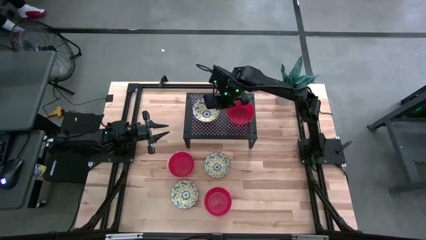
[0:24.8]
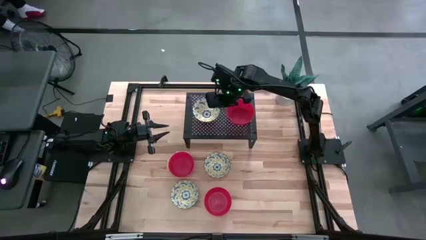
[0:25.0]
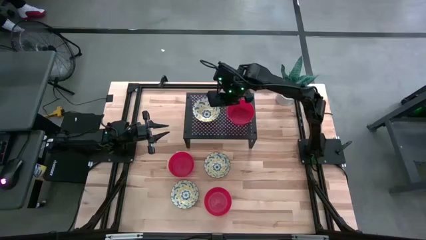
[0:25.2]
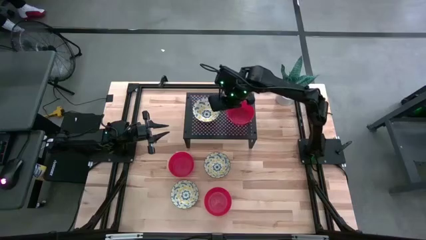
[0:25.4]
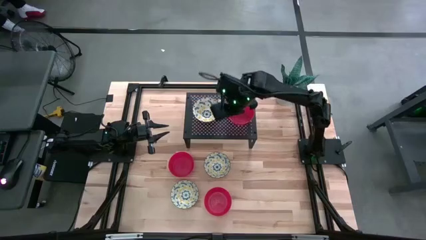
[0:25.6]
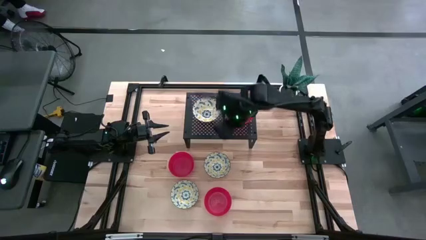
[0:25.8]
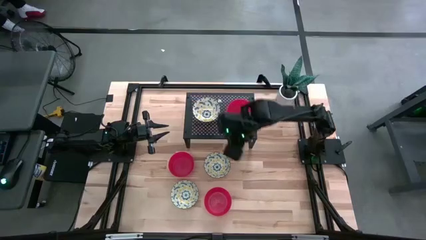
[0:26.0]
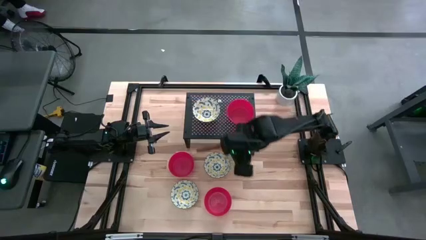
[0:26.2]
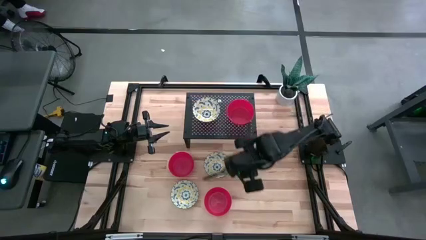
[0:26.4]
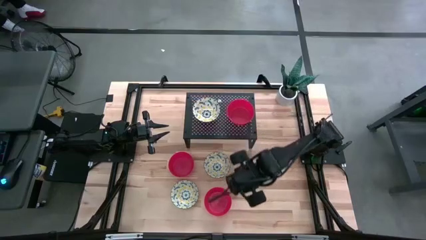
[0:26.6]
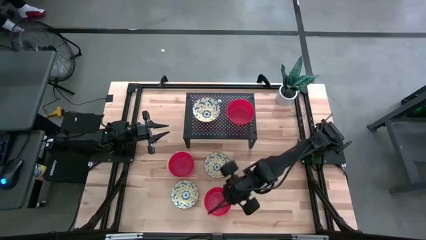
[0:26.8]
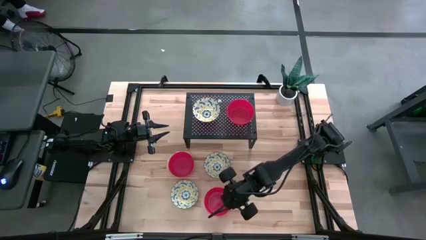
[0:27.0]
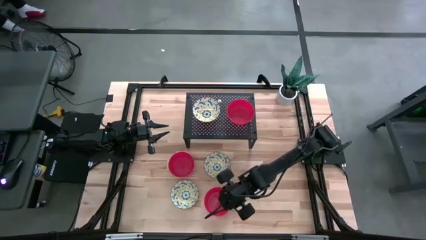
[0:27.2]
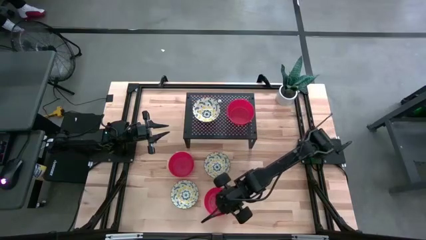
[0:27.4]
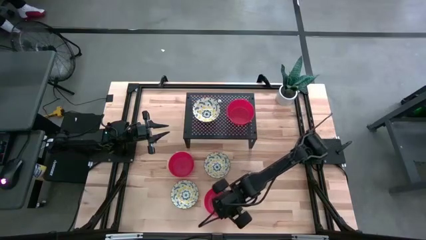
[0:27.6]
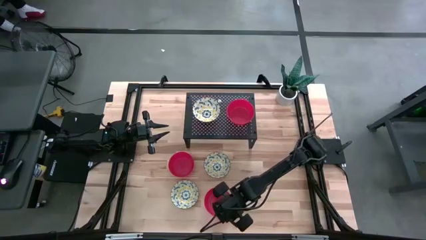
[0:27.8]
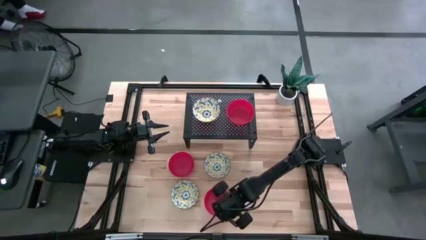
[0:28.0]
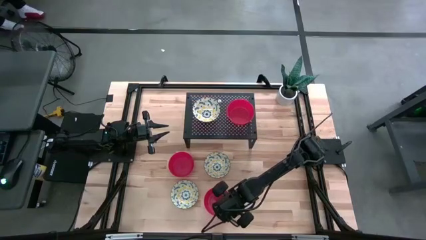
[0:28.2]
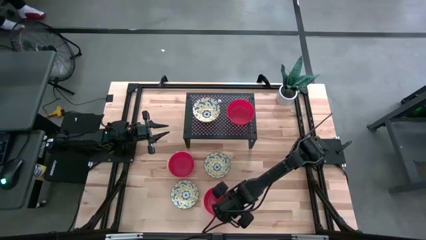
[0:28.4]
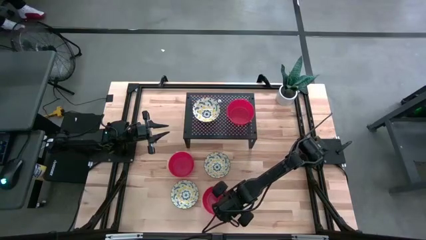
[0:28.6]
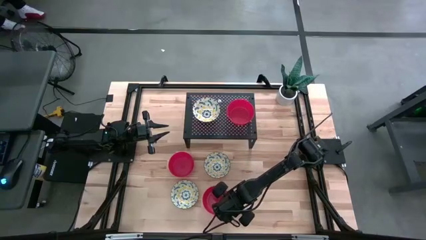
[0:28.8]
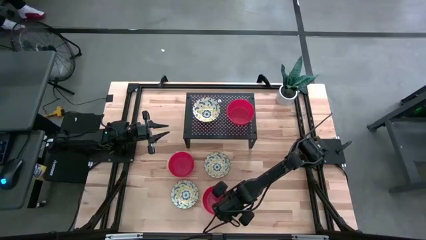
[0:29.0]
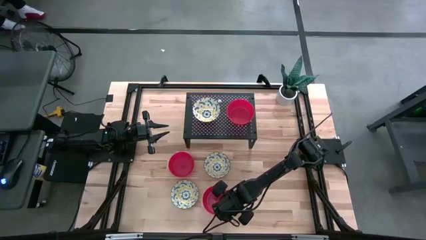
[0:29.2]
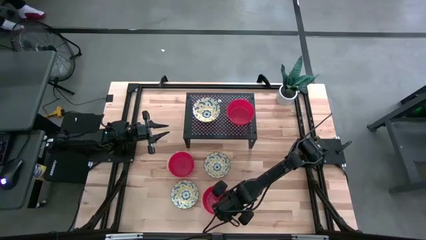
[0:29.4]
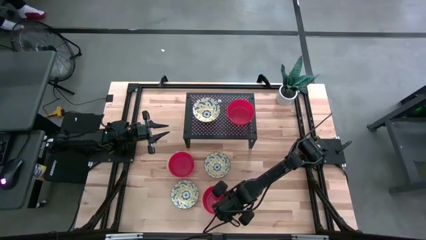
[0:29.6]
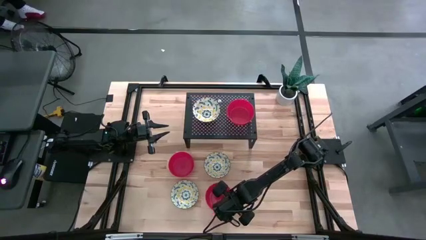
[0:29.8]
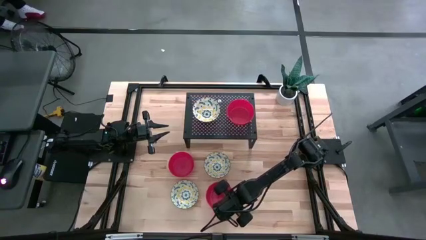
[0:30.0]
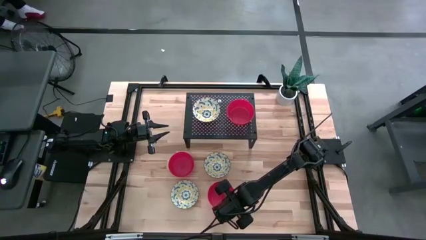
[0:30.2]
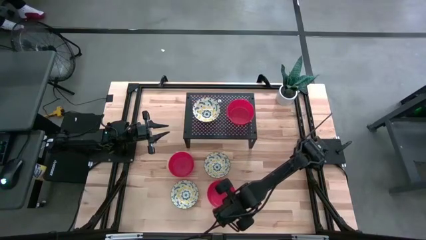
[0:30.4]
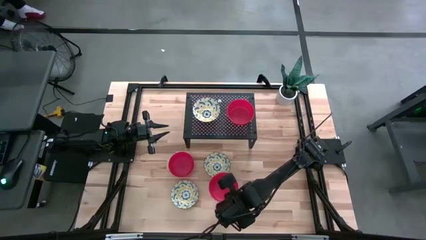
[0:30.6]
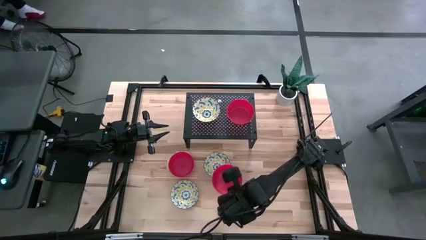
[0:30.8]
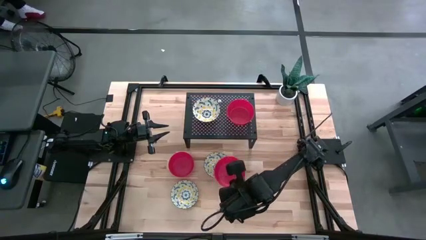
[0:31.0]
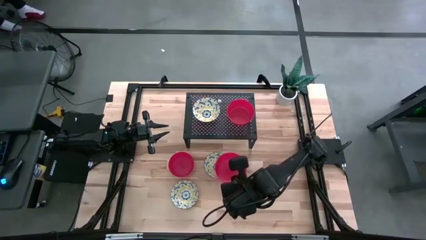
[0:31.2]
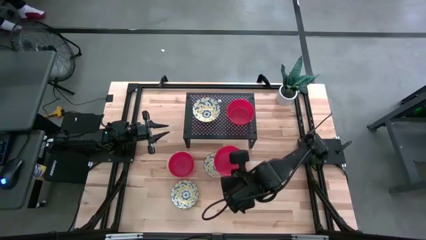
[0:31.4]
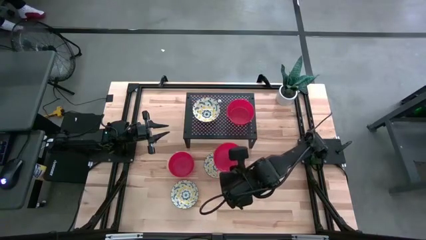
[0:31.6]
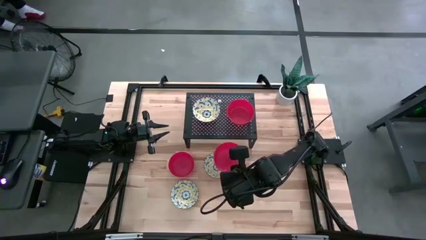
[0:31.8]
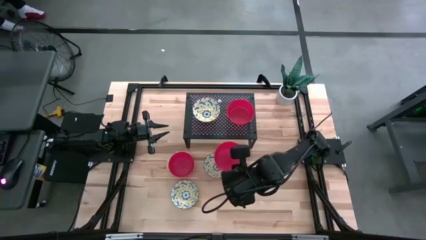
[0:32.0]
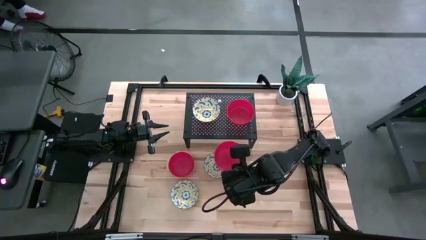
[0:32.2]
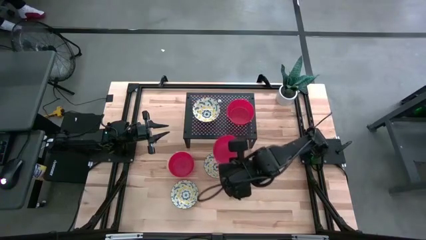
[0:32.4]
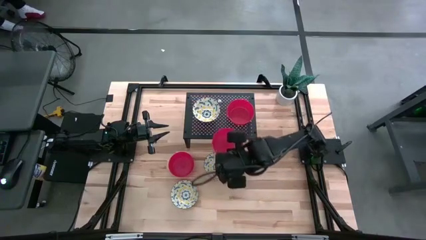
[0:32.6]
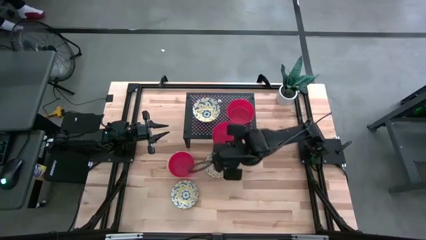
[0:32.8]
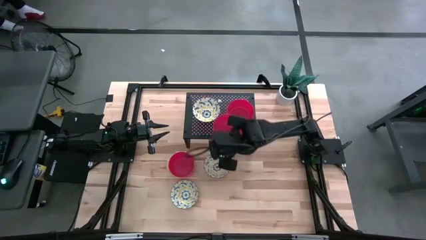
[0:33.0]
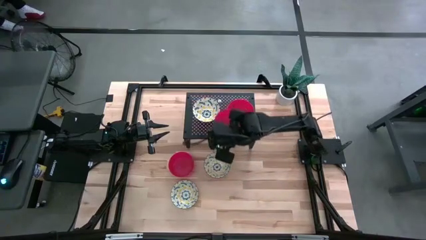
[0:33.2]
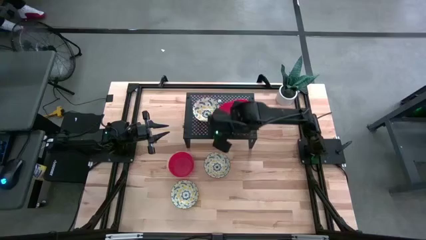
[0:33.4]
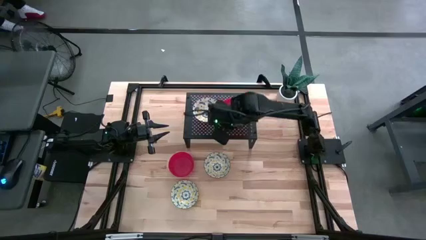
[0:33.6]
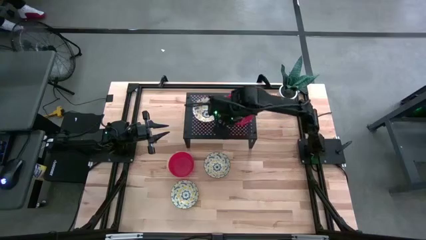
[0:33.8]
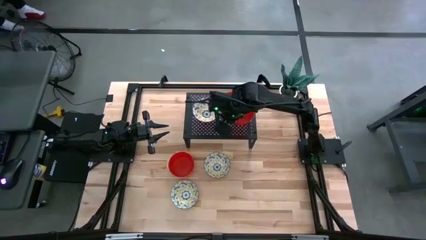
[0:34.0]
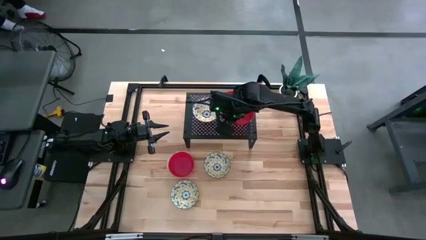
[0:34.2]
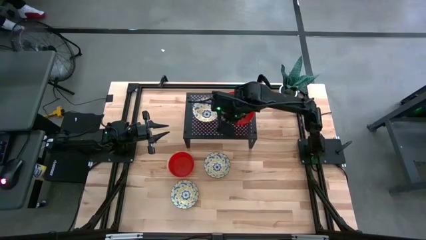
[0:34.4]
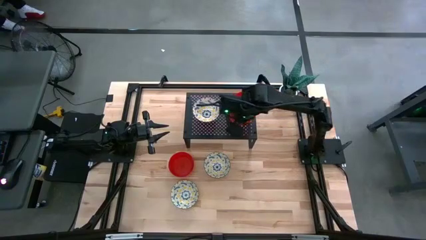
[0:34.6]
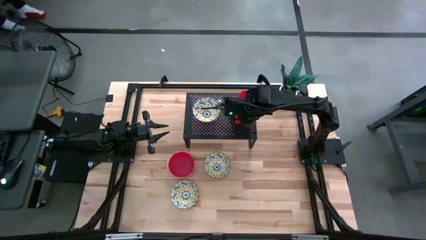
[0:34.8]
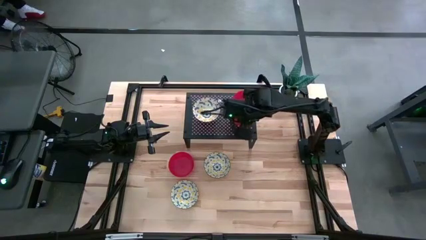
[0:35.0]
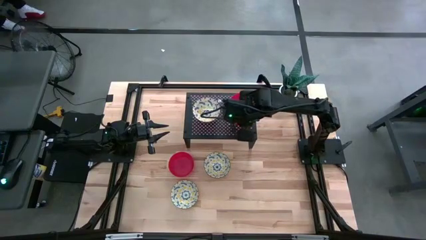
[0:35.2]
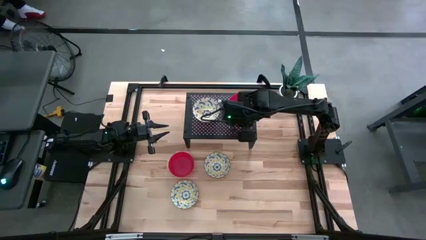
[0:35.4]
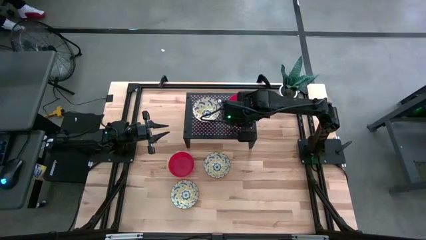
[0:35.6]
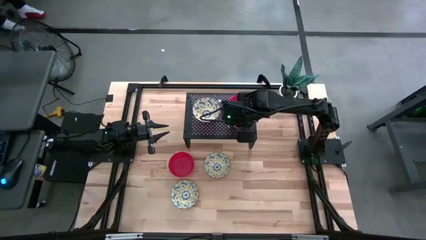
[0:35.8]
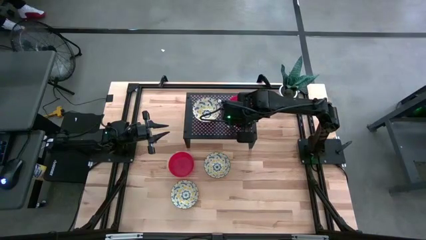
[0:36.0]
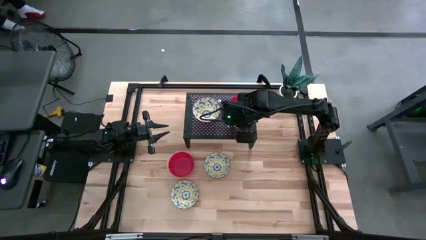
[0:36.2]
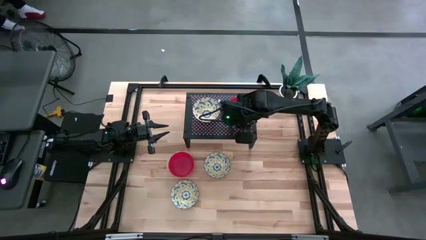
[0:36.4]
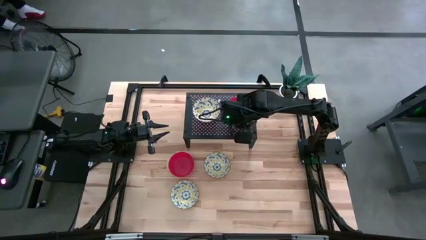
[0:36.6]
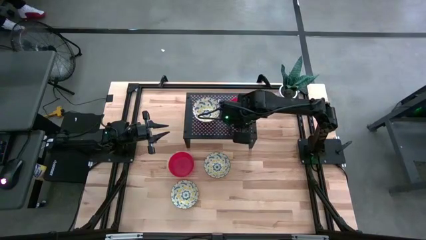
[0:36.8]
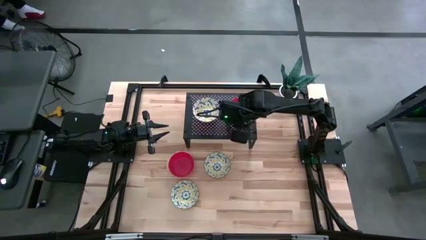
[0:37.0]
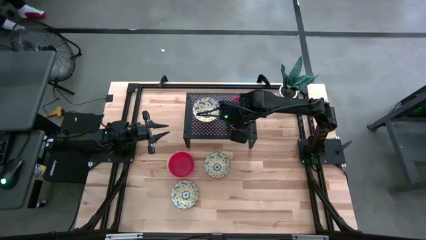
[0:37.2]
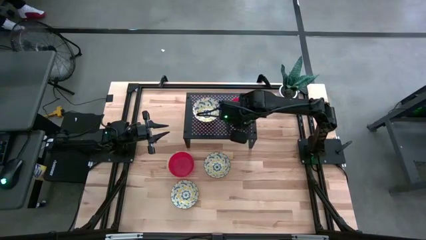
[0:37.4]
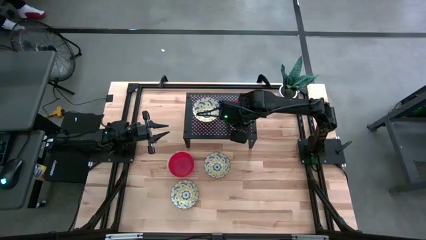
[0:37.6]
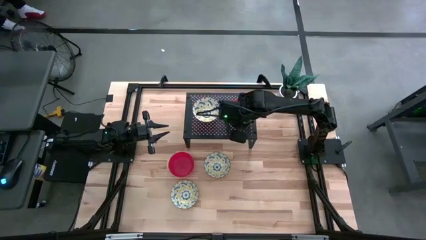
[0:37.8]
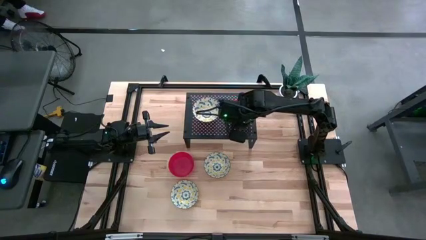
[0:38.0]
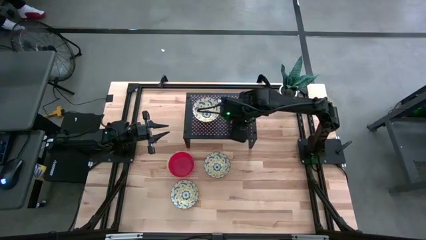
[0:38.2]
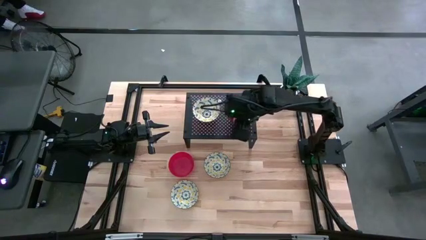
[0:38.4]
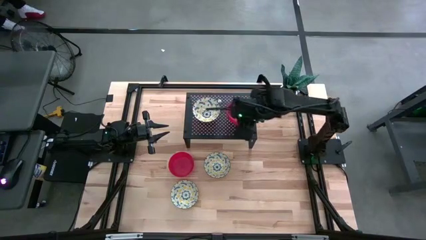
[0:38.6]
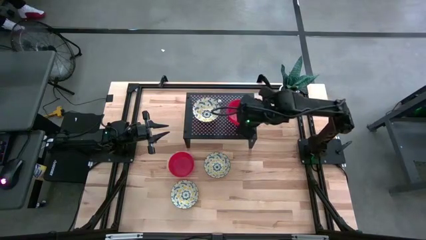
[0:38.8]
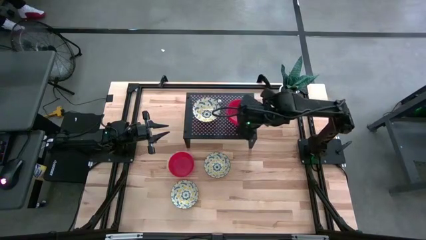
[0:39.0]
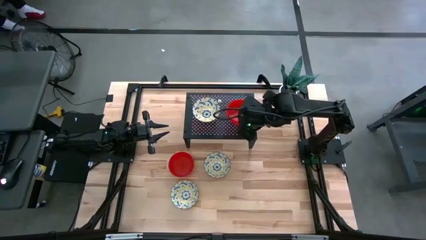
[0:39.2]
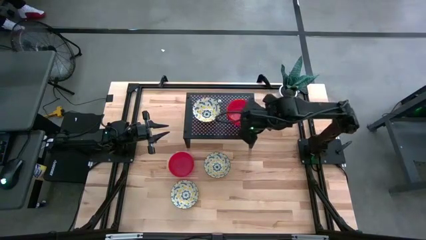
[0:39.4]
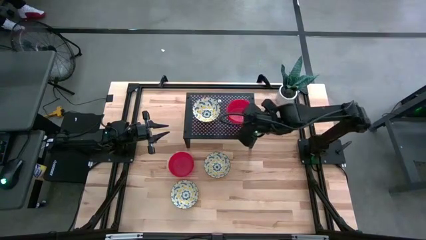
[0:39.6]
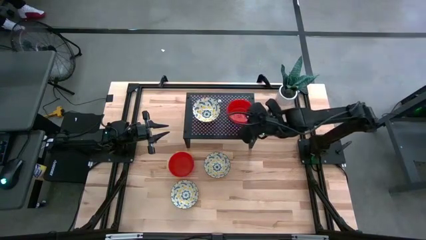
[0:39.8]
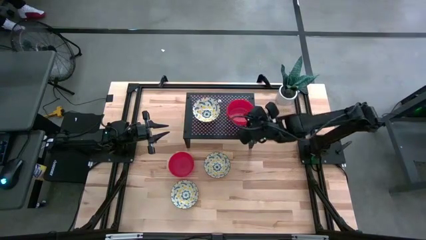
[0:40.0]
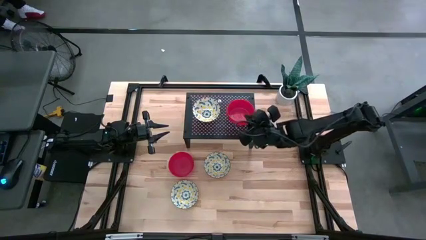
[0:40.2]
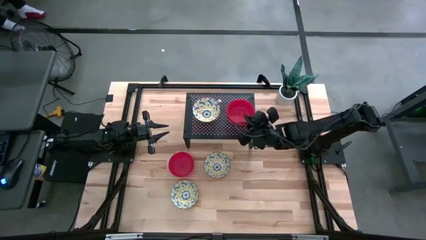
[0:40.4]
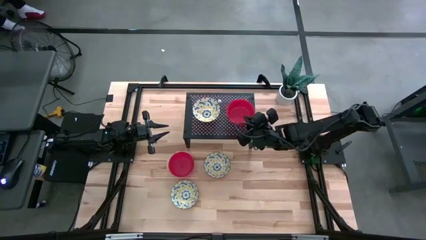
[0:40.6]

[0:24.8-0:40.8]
Task: Pick & Place Mini bowls
Stack the right red bowl on the red bowl on the shelf

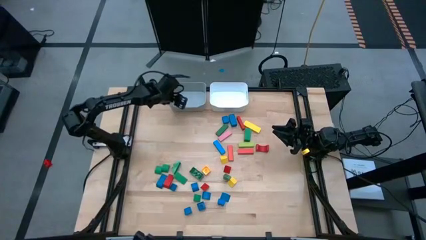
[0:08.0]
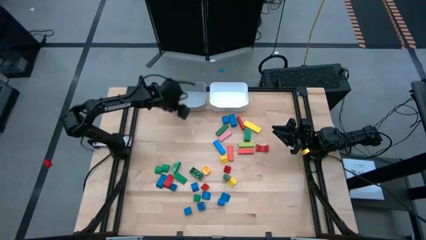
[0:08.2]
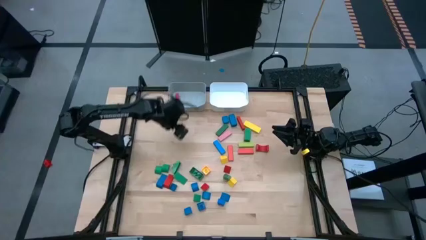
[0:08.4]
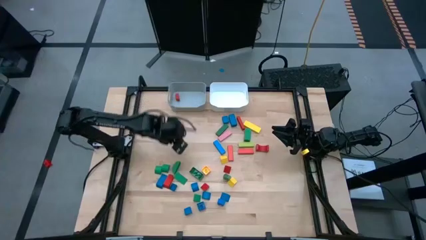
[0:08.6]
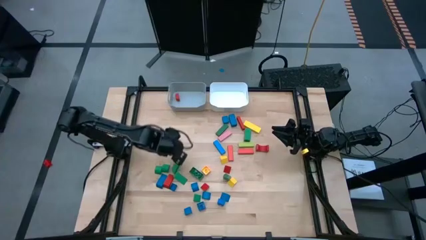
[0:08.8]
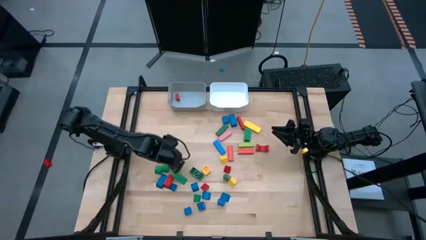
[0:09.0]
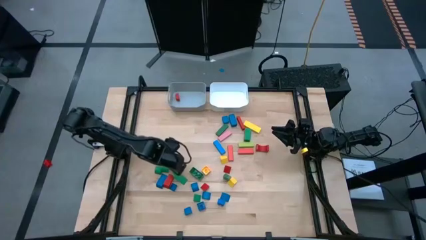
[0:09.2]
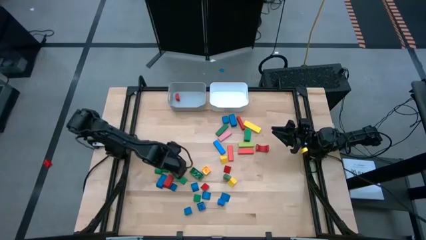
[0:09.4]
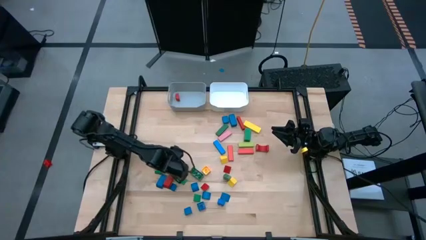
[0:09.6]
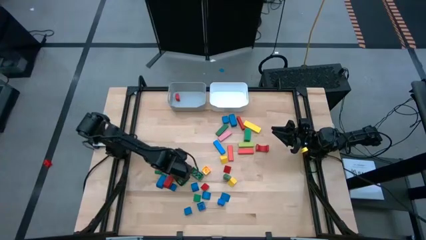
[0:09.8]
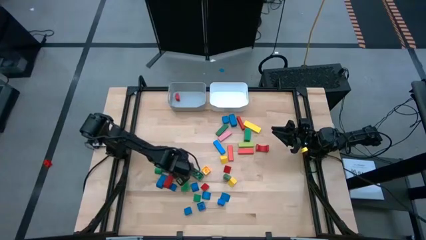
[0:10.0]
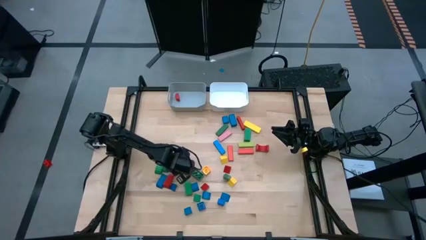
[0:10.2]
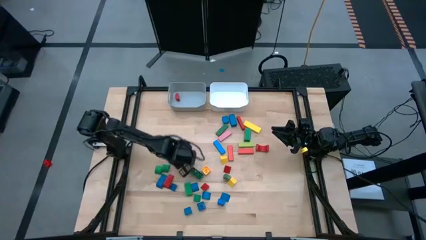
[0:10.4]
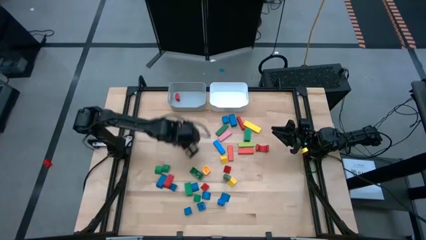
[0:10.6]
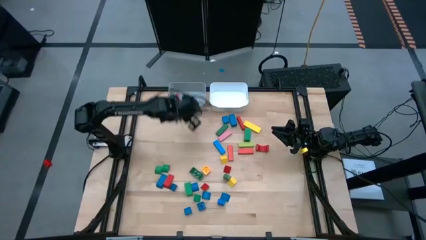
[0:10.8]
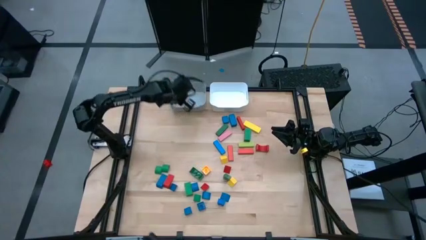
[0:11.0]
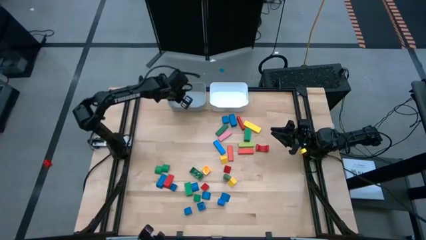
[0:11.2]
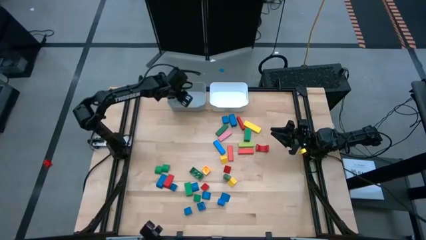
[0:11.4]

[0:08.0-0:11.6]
Task: Sort blocks by size
Put the green four-stud semi-circle game piece into the gray bin
